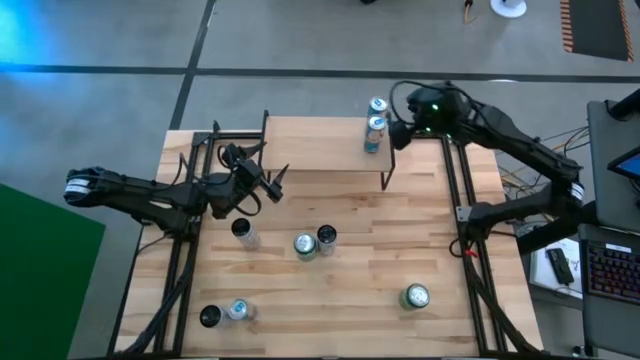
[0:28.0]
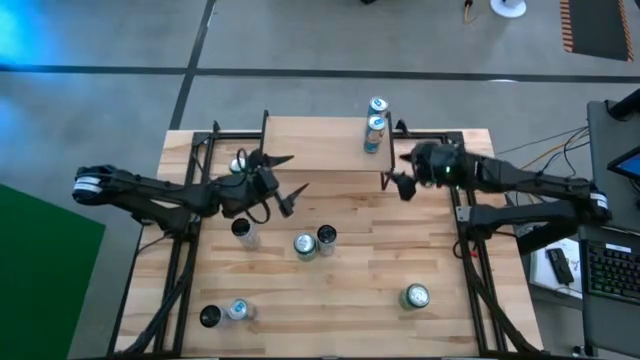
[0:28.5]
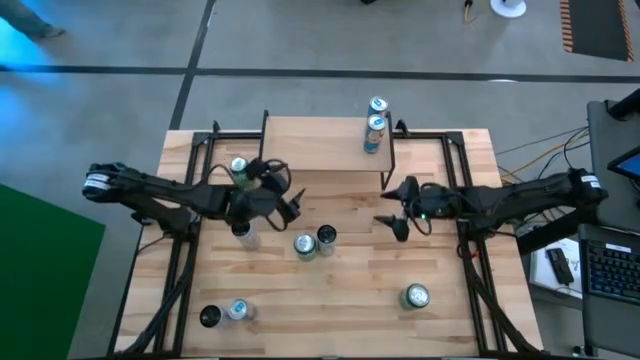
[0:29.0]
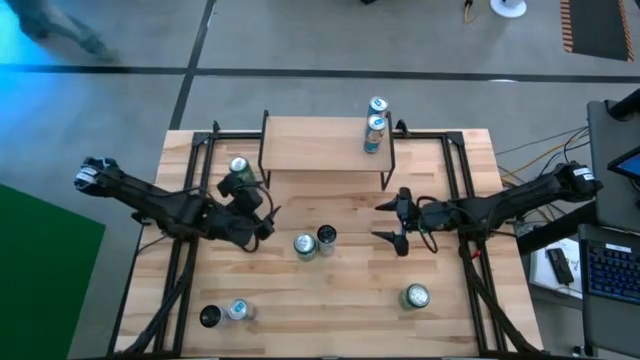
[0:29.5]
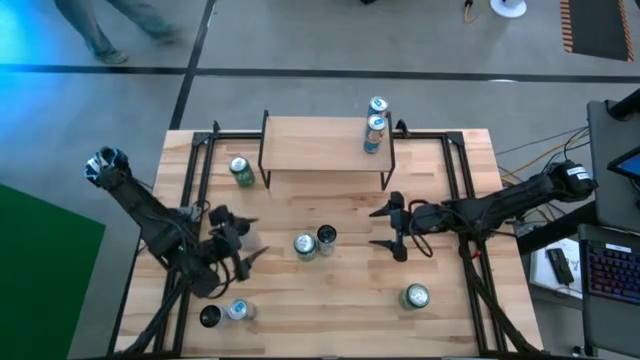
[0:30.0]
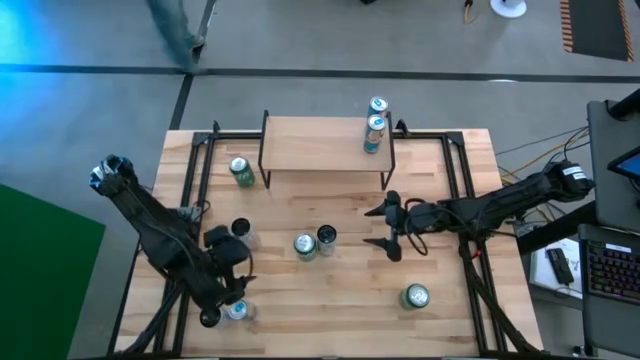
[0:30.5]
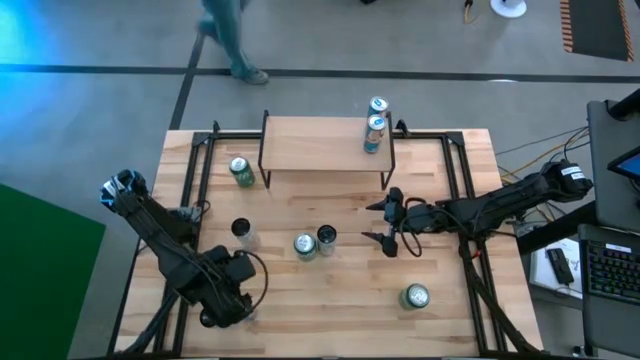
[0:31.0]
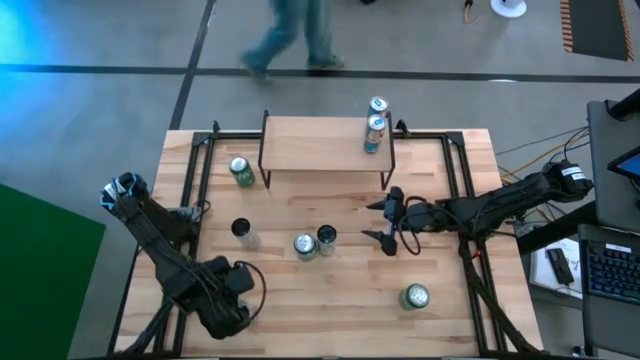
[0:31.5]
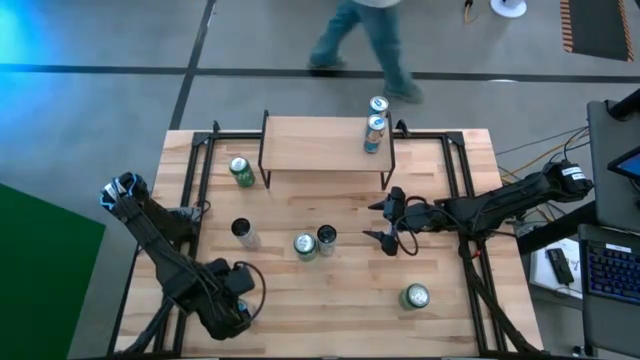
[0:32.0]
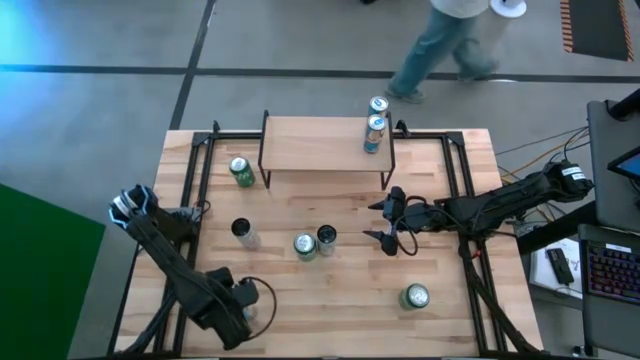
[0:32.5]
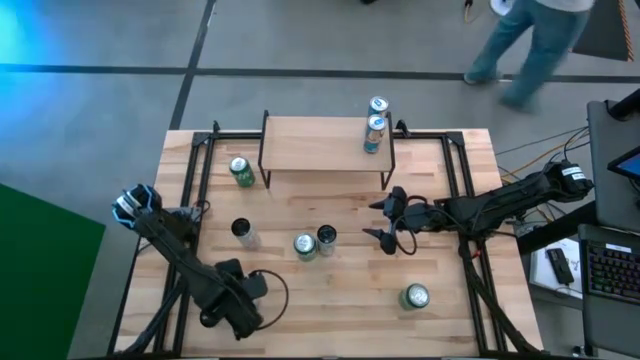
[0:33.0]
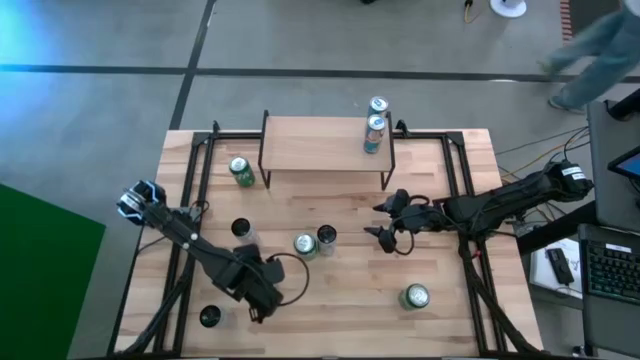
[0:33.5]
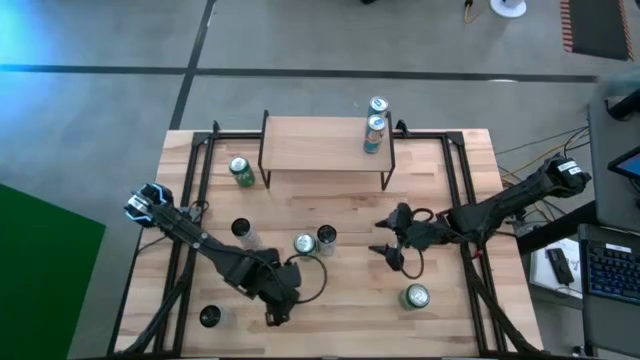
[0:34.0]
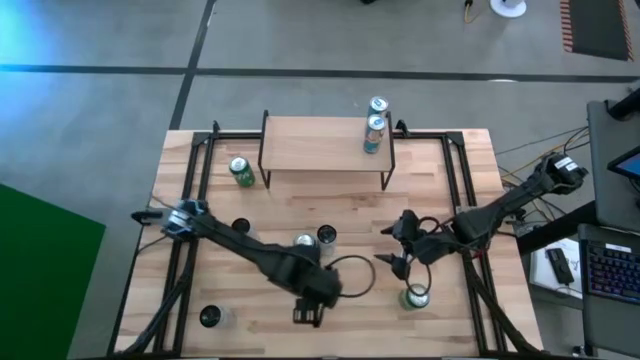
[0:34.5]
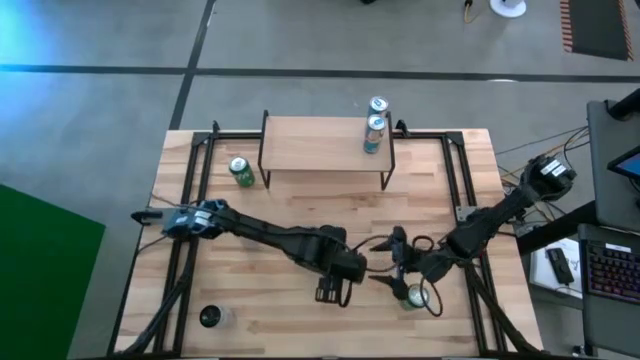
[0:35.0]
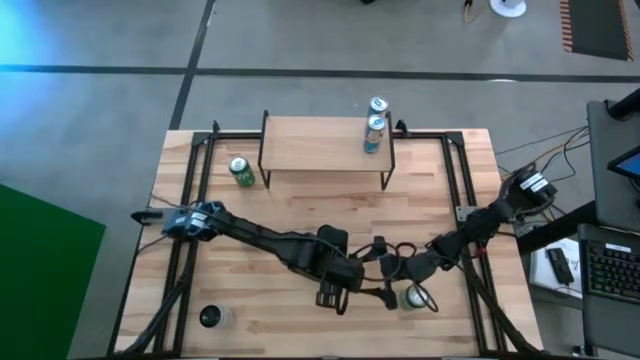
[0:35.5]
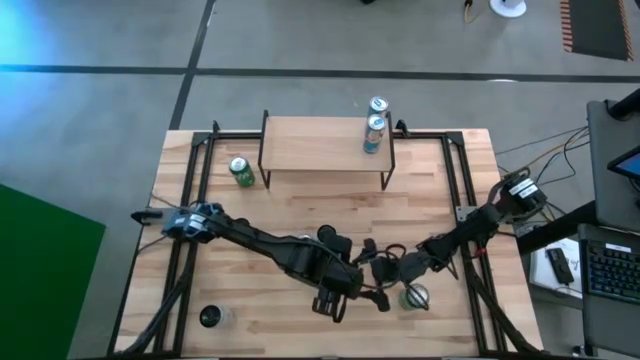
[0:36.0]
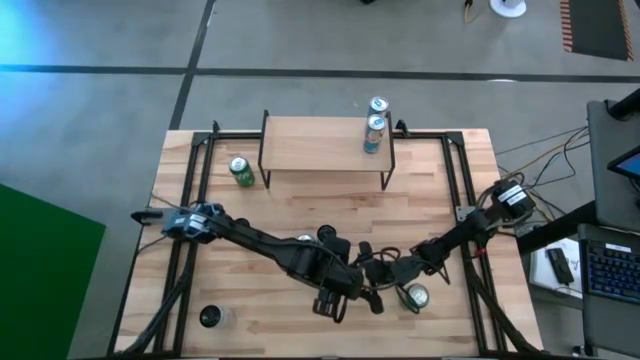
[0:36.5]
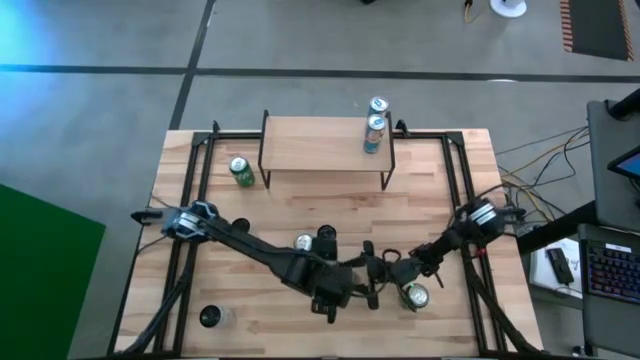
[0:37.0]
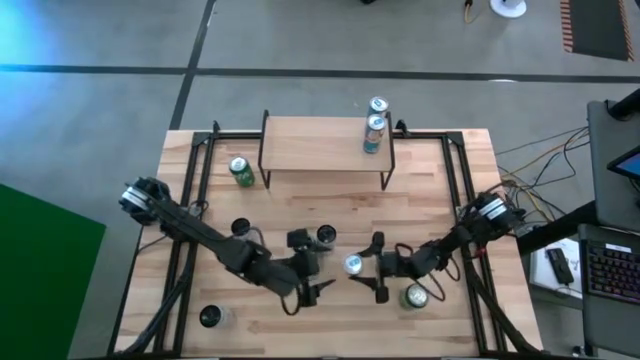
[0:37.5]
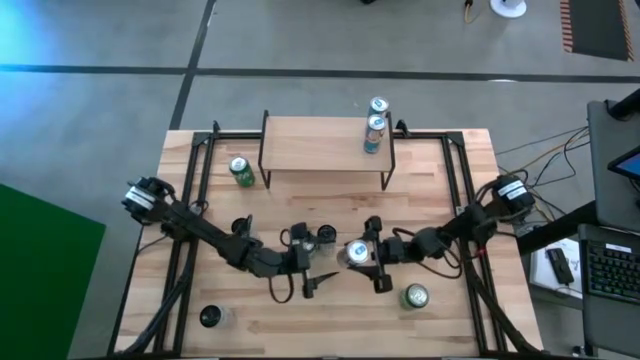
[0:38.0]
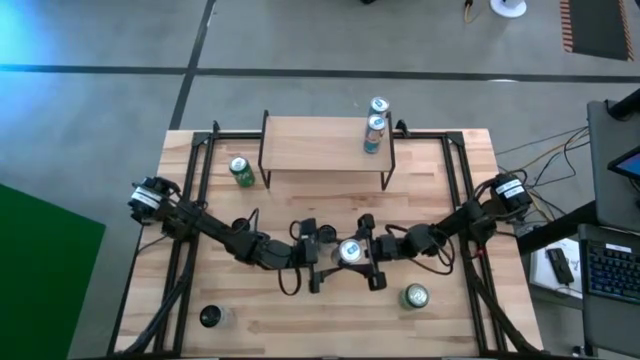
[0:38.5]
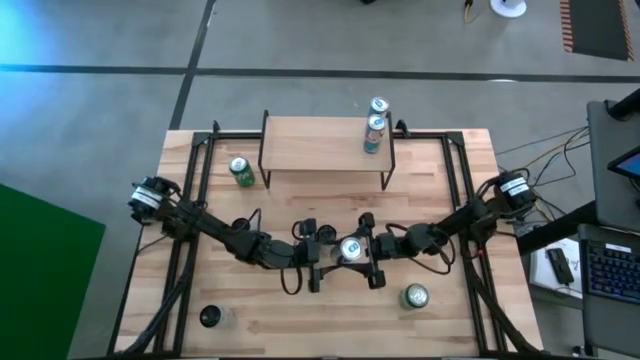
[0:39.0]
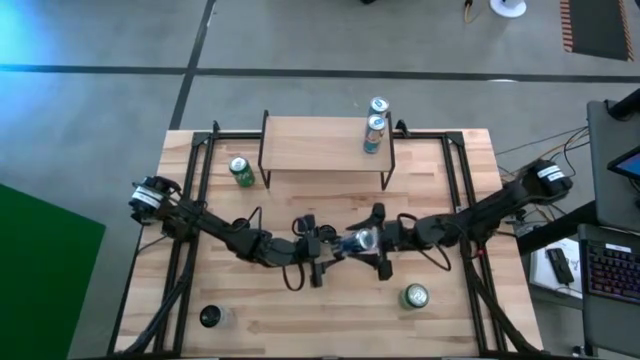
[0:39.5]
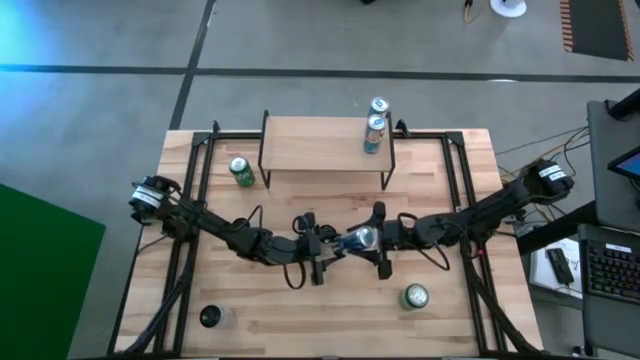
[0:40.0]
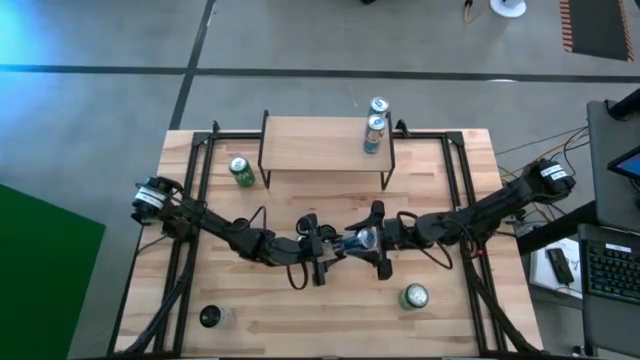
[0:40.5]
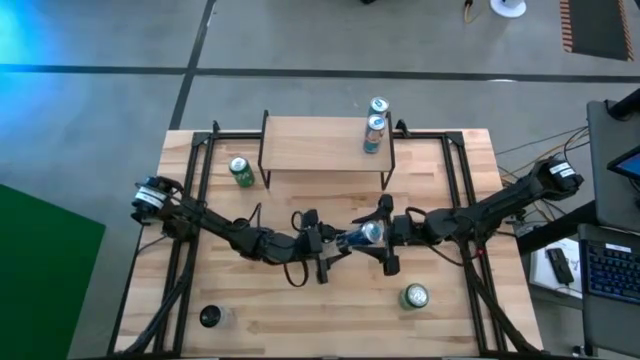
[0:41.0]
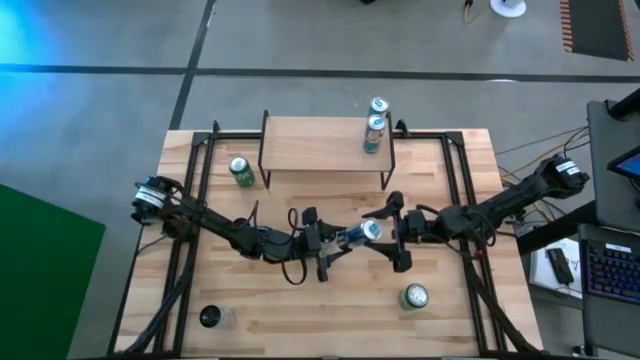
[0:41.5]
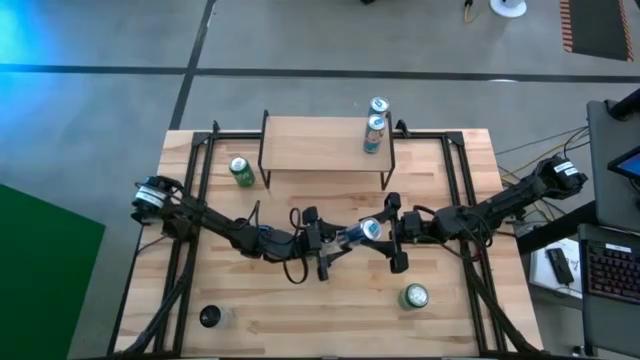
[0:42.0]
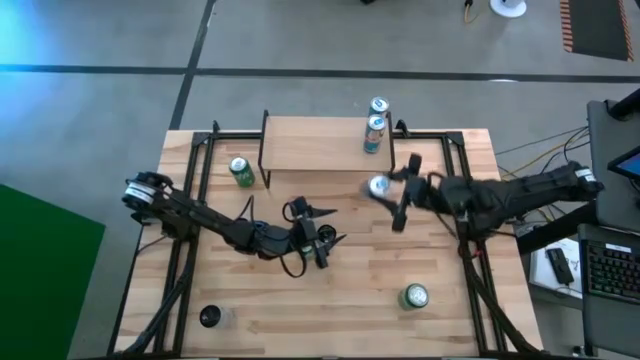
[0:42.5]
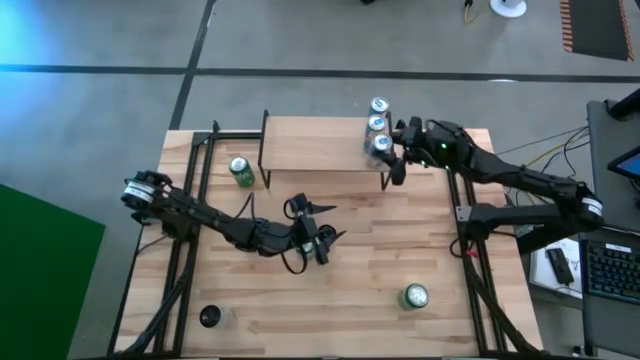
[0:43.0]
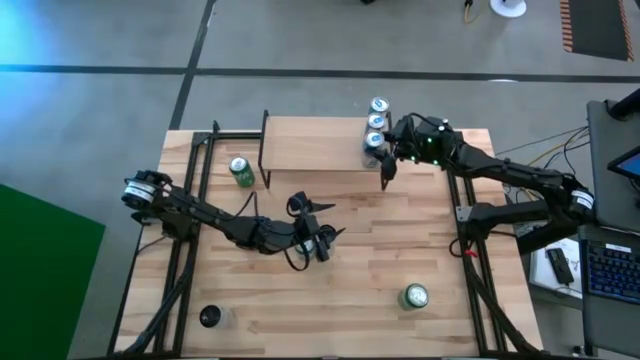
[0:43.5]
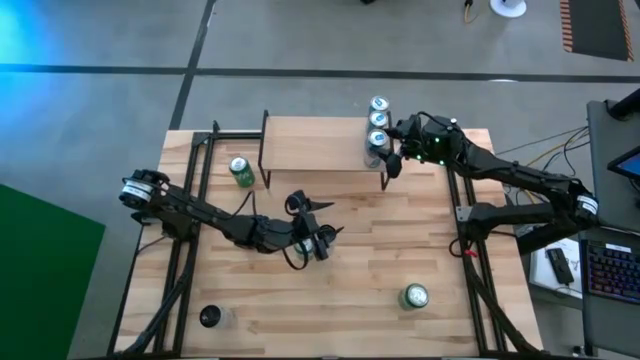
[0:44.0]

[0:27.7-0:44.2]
Task: Sort soda cans
Put the blue soda can on the shelf and align it with other blue soda cans

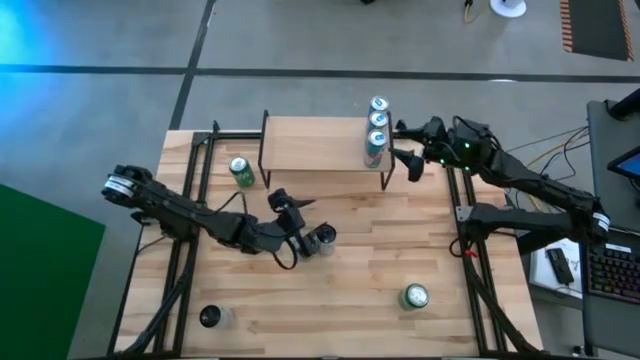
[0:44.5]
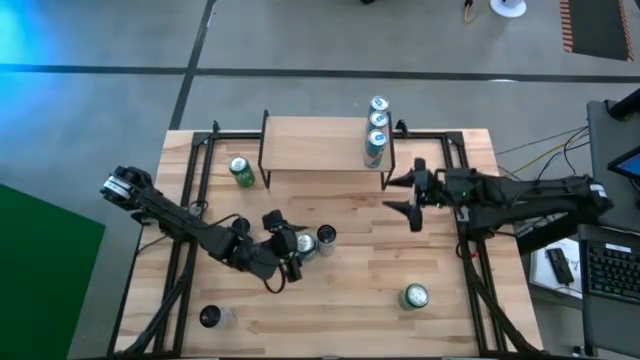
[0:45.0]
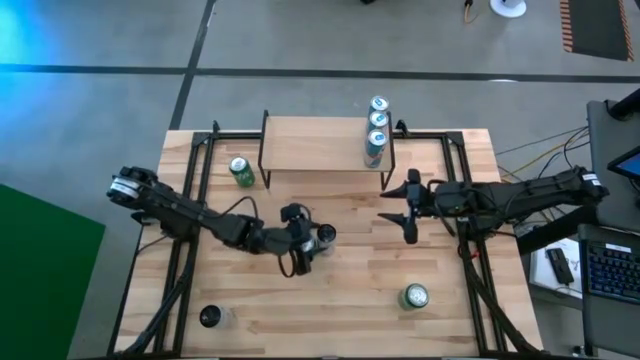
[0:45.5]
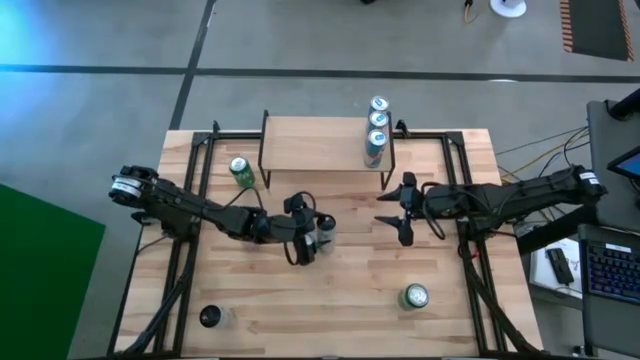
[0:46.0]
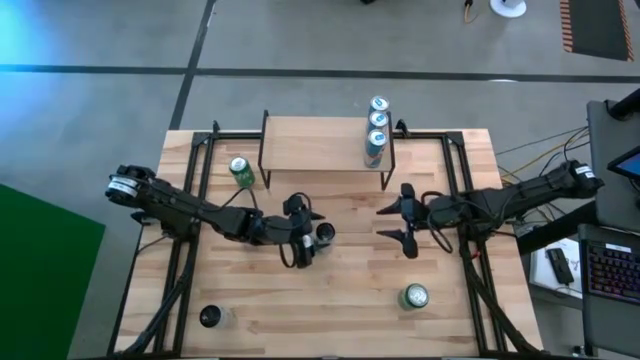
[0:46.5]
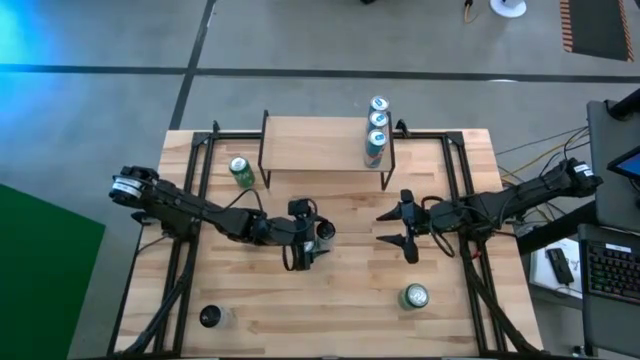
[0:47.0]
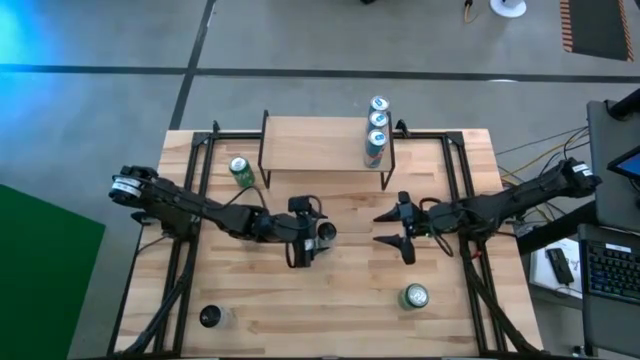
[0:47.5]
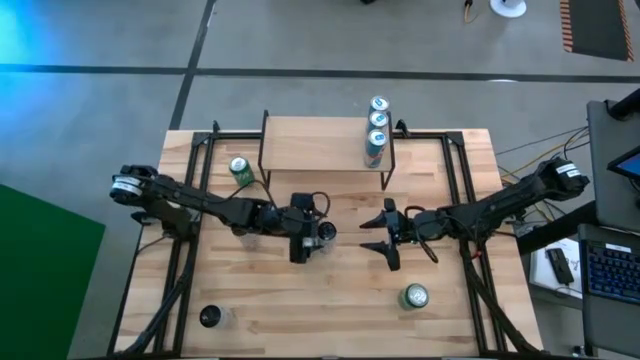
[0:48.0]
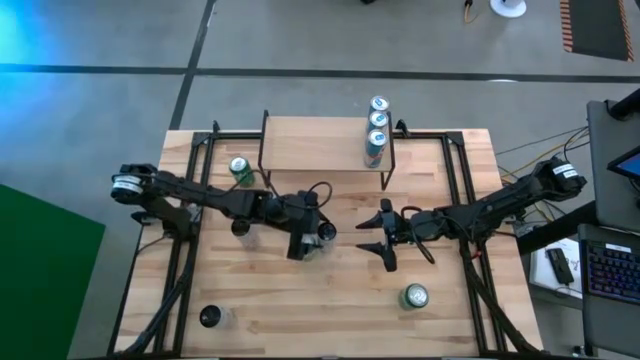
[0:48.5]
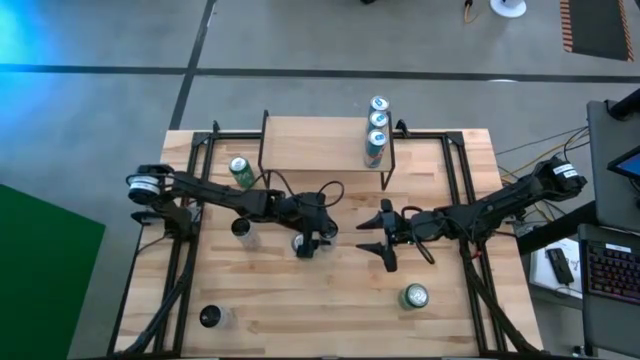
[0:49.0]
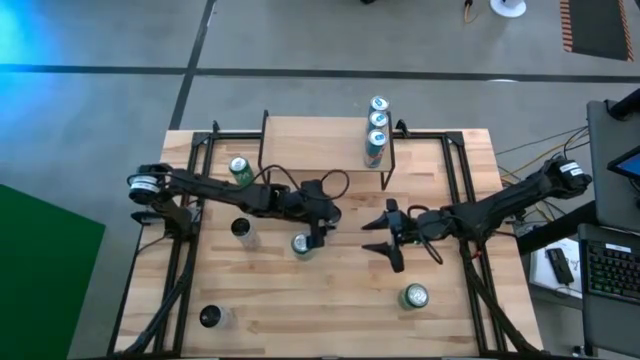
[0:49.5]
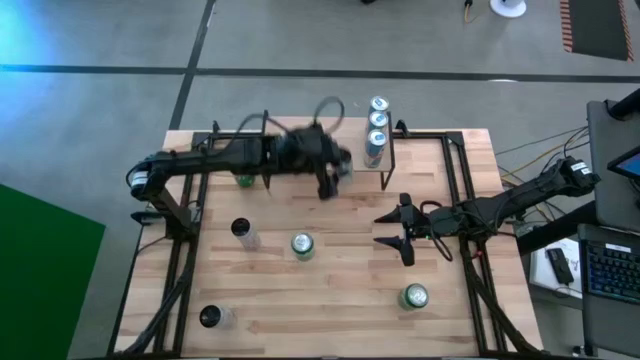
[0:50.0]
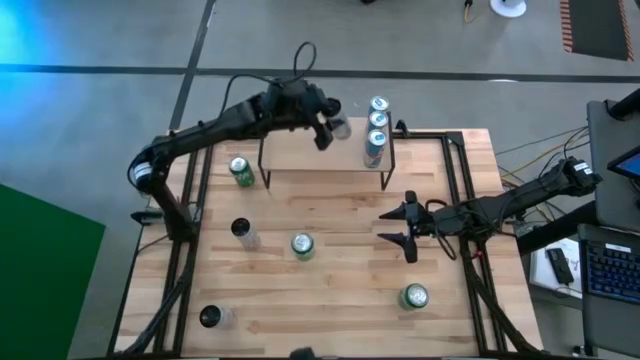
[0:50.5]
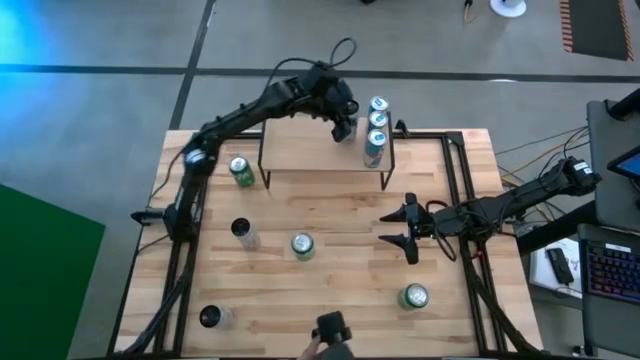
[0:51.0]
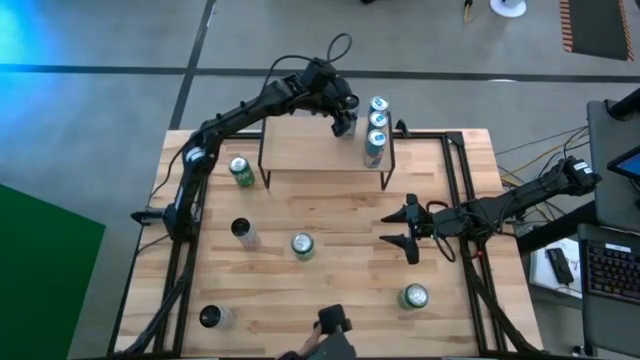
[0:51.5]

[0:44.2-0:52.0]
Put the right white-pink soda can on the shelf
